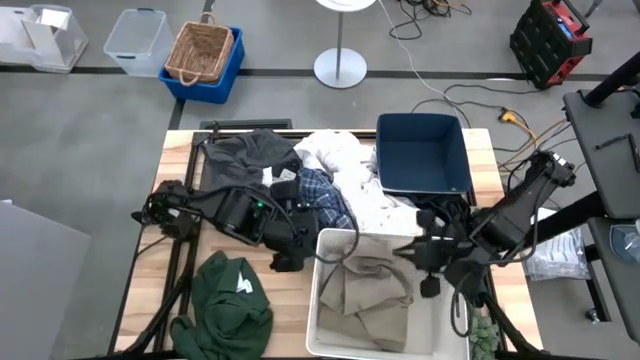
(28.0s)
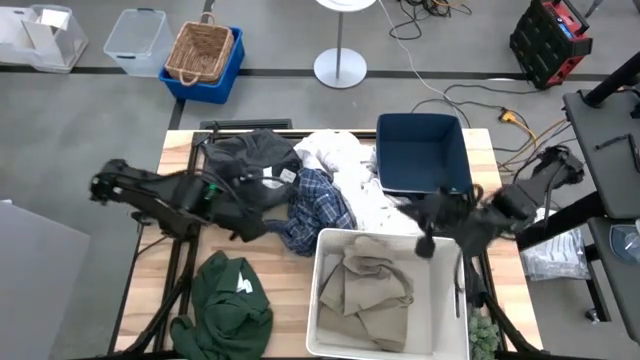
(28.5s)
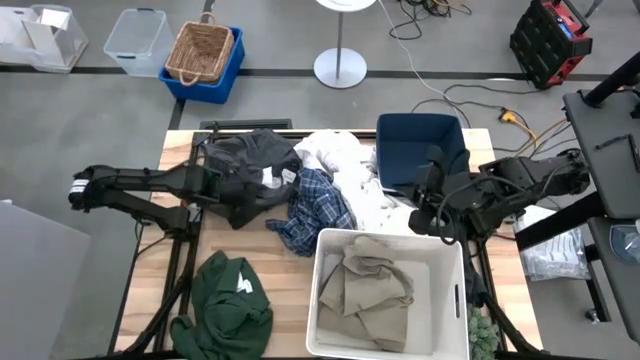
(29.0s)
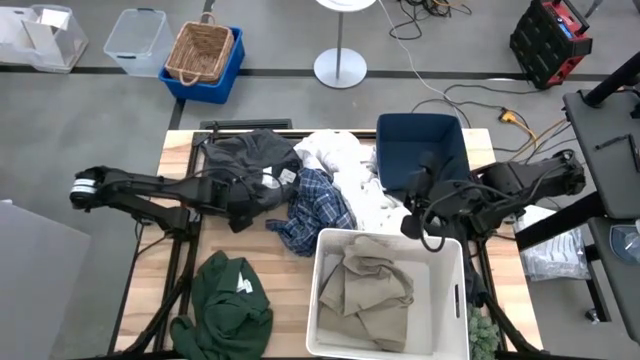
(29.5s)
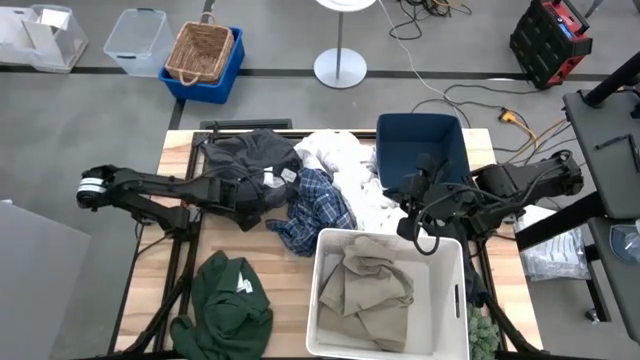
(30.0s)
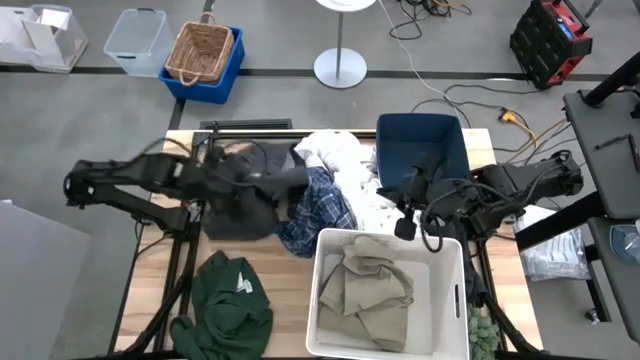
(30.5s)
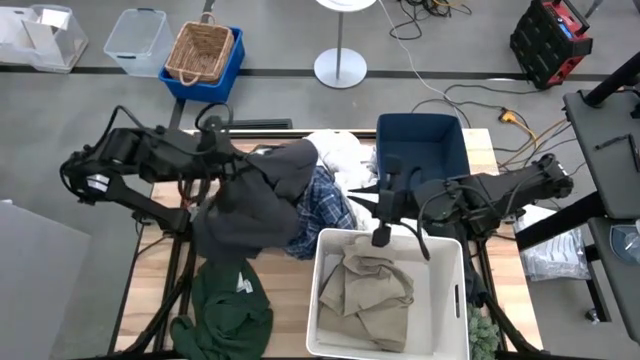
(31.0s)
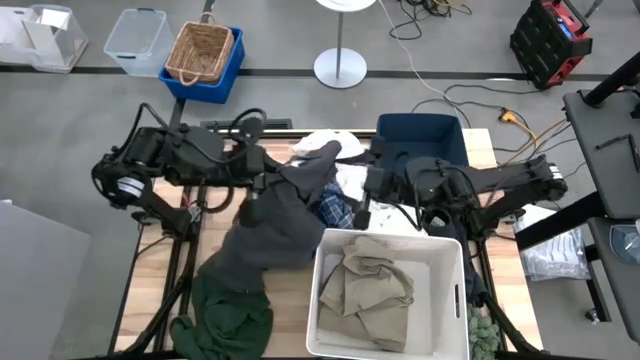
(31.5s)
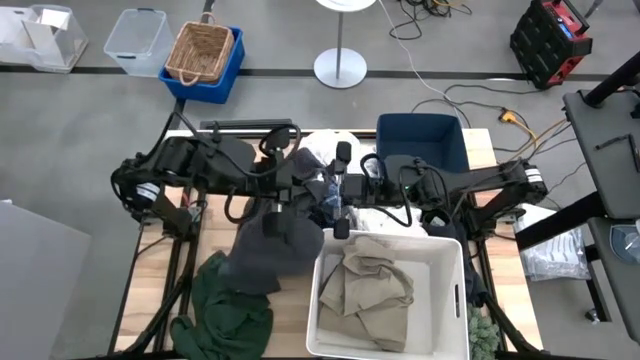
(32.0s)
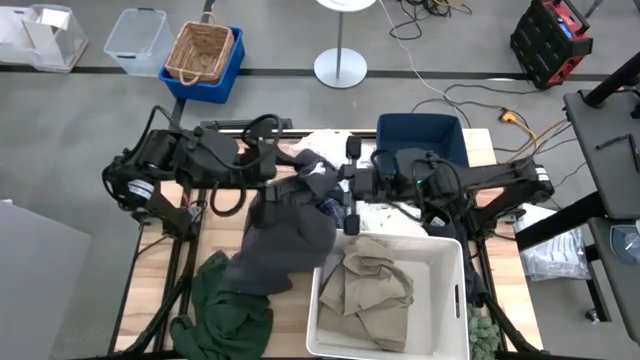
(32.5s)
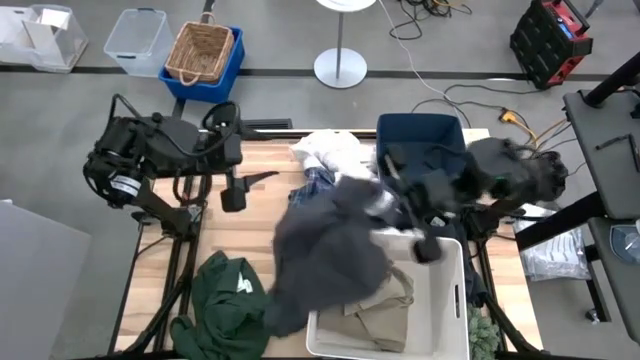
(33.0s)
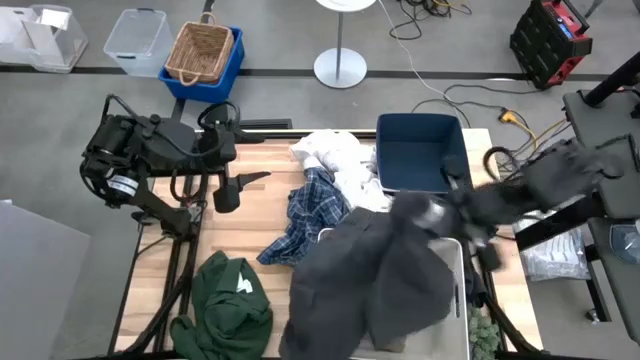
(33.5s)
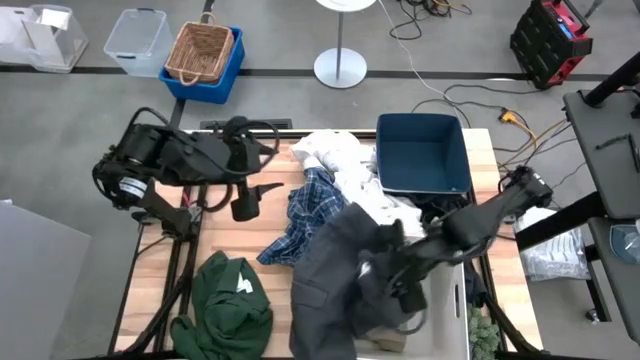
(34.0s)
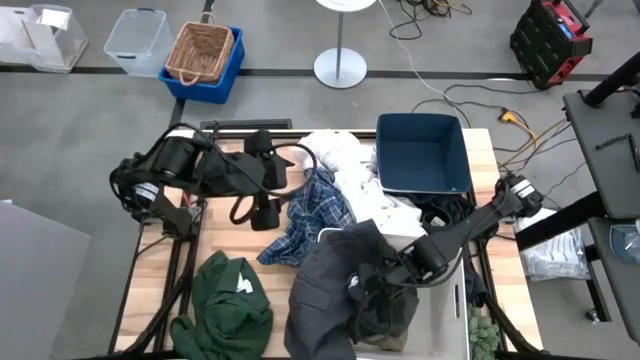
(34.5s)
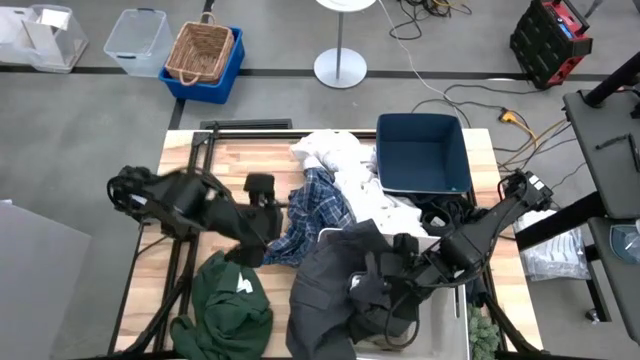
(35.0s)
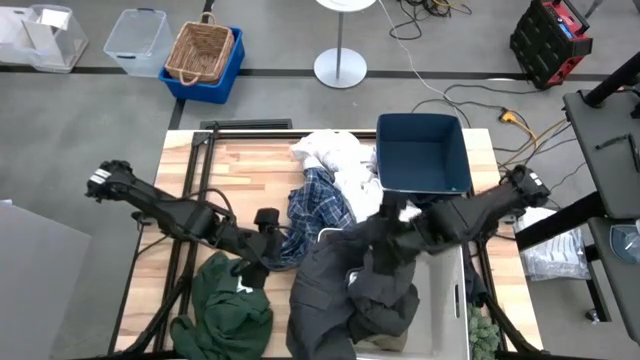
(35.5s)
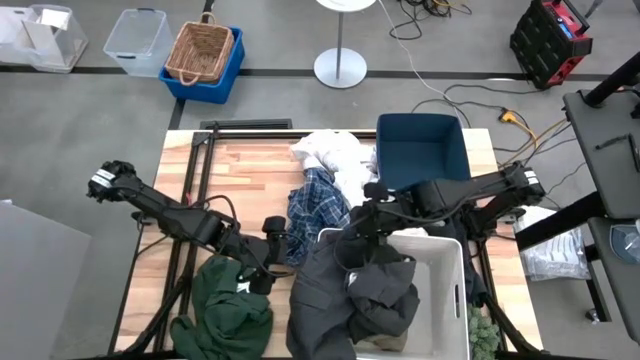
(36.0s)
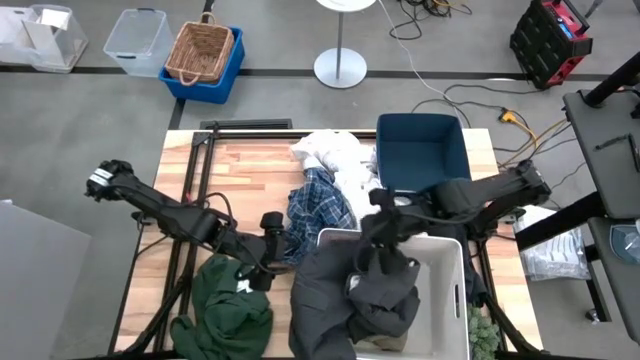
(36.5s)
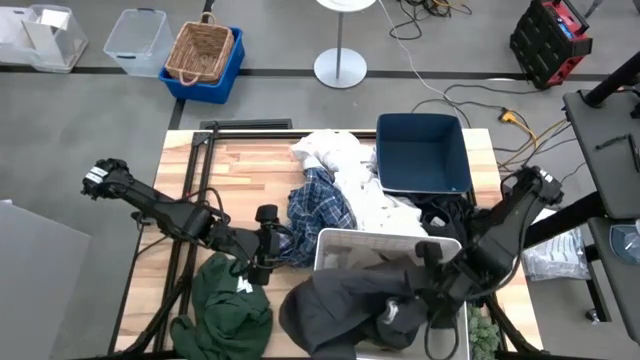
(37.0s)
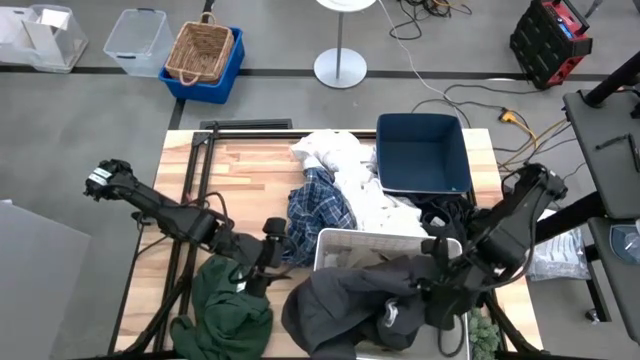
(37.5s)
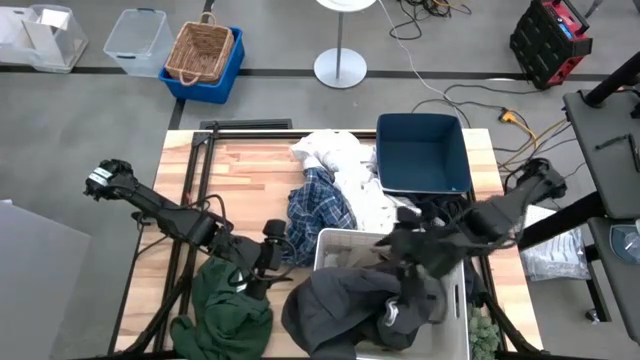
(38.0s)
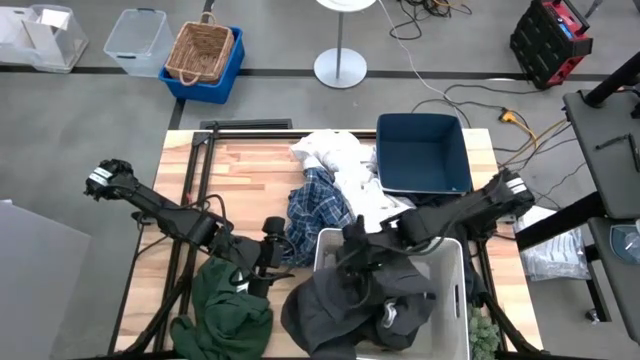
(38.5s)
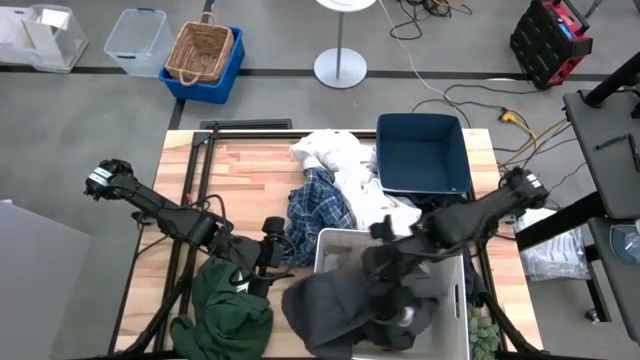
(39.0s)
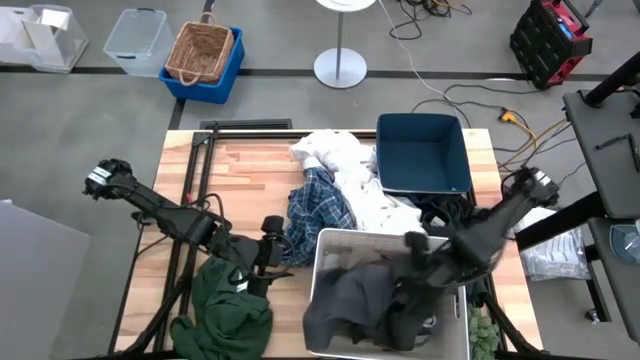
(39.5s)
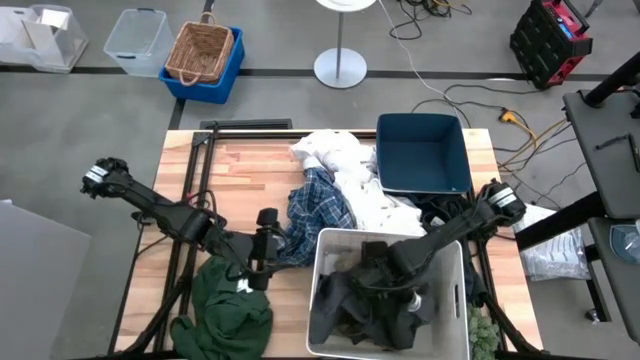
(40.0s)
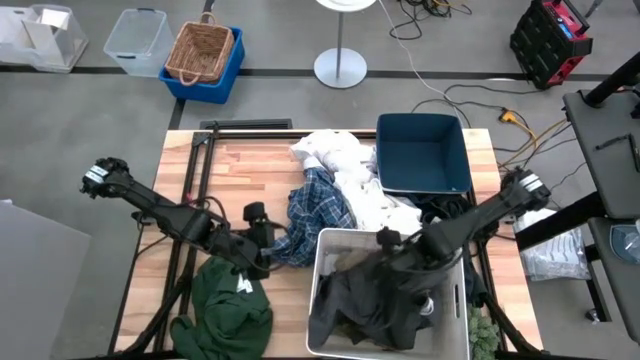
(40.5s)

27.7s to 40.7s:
Task: Sort clothes
Put the gray shorts into the white bin

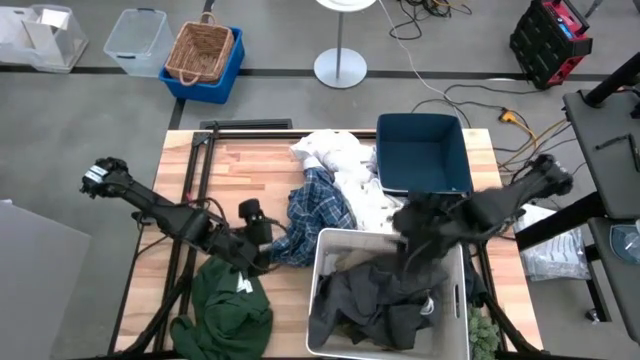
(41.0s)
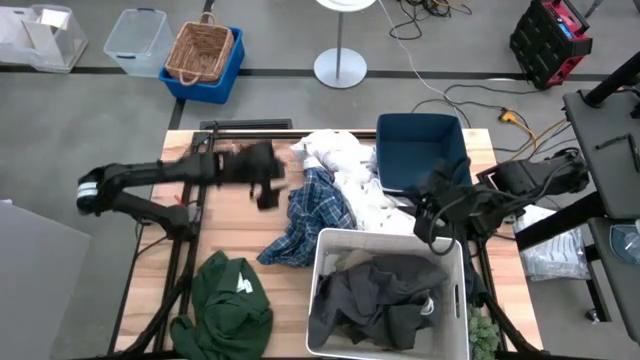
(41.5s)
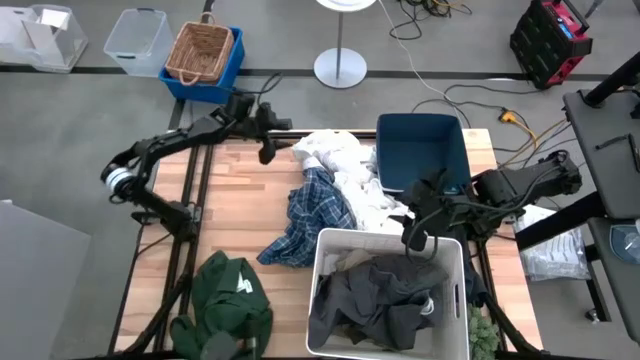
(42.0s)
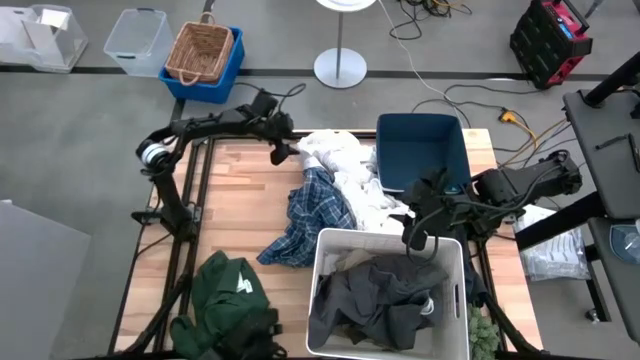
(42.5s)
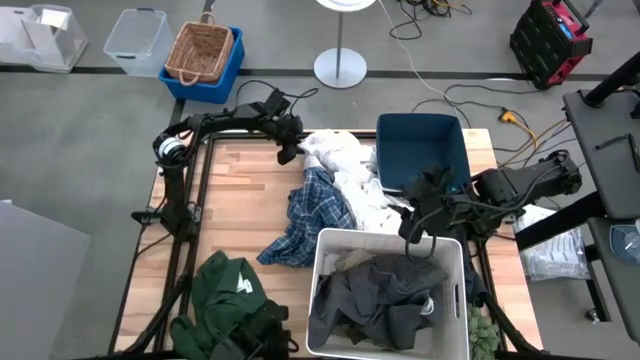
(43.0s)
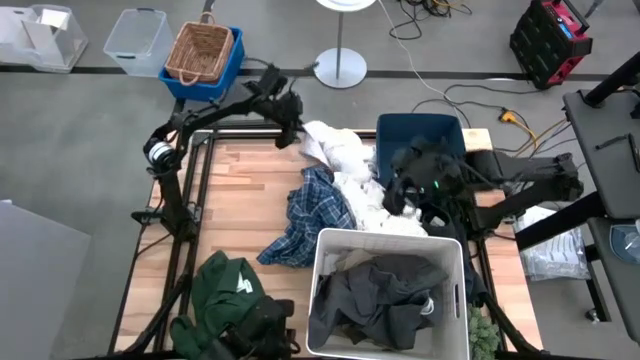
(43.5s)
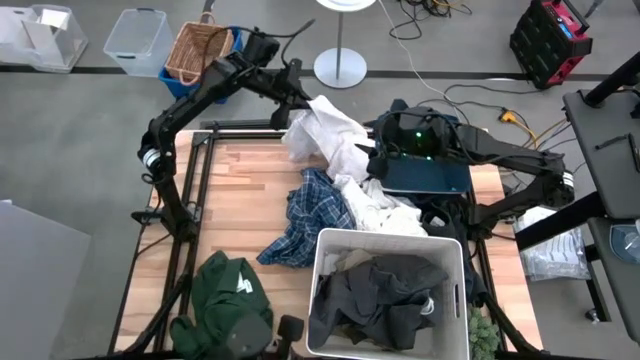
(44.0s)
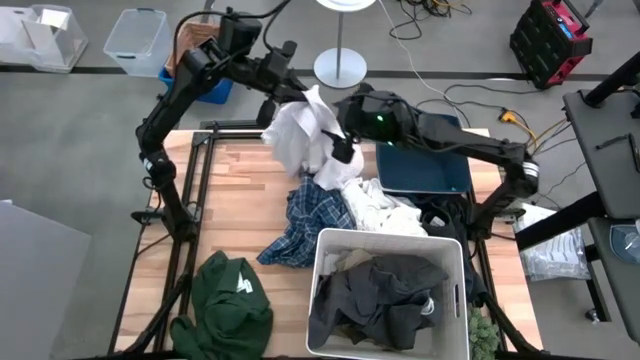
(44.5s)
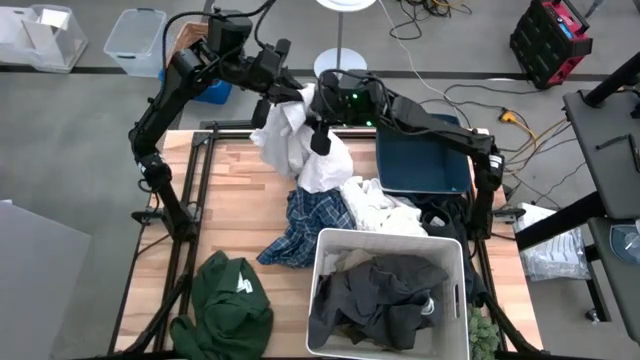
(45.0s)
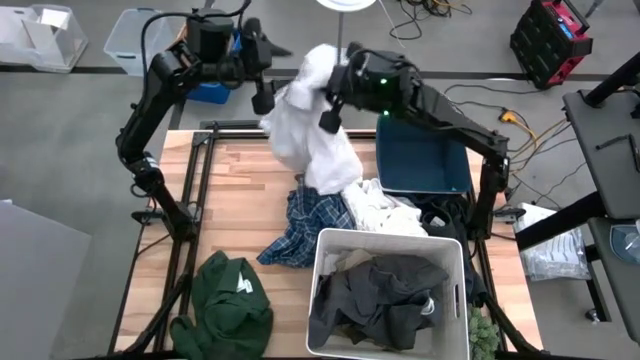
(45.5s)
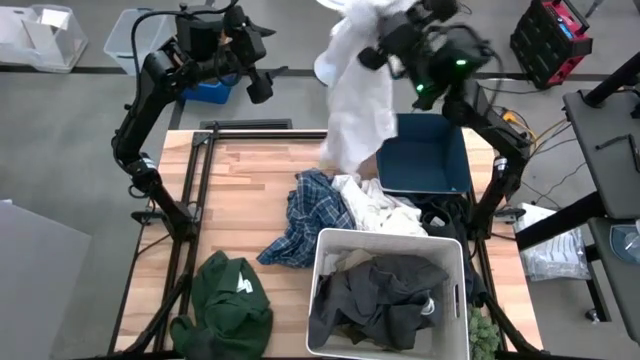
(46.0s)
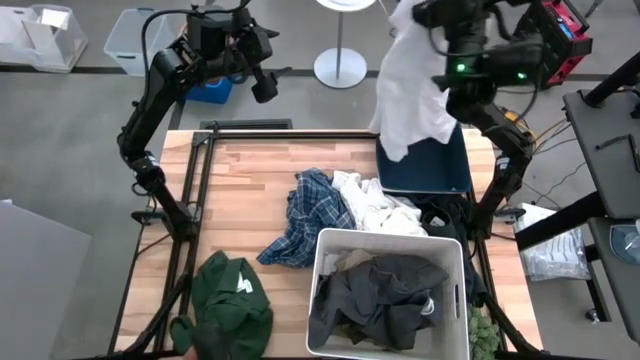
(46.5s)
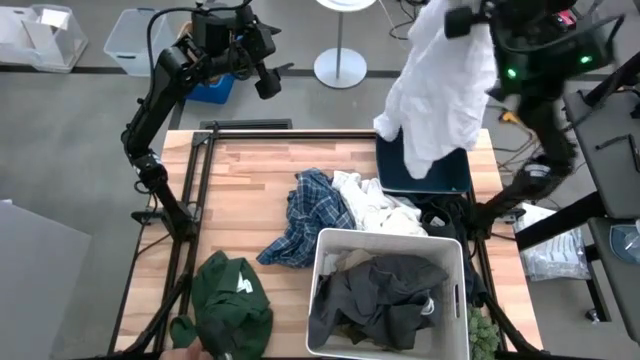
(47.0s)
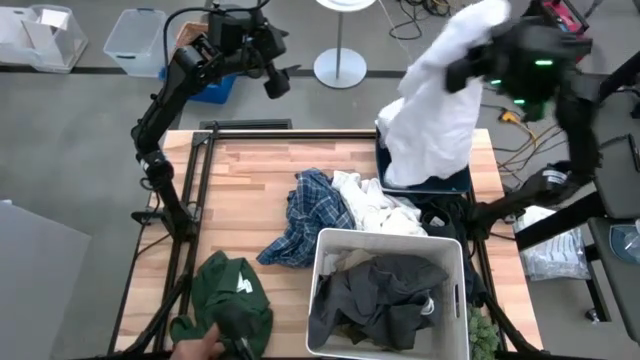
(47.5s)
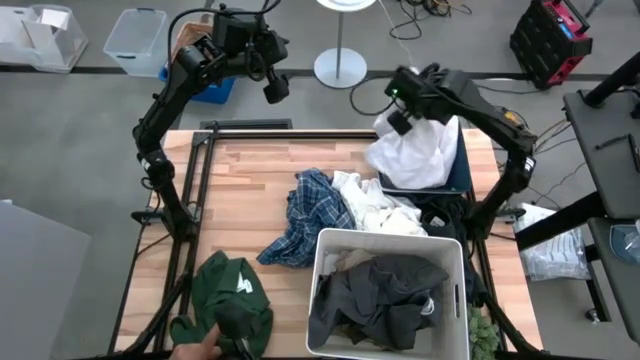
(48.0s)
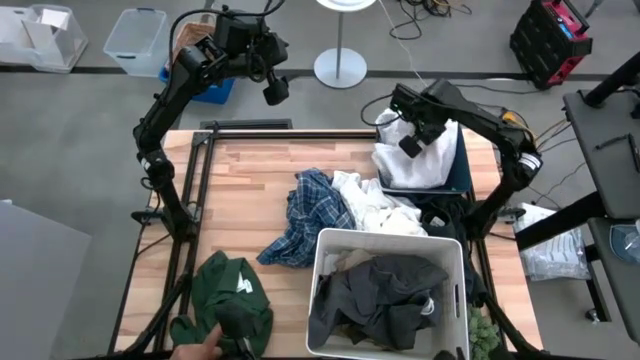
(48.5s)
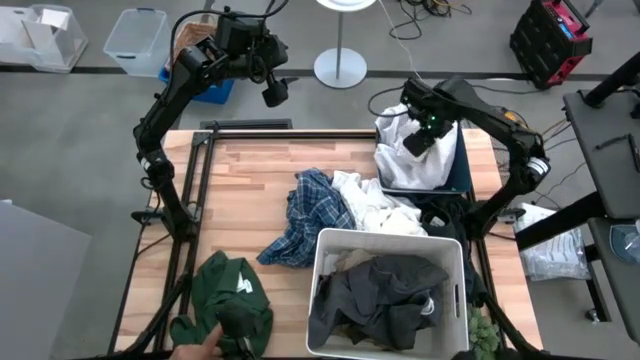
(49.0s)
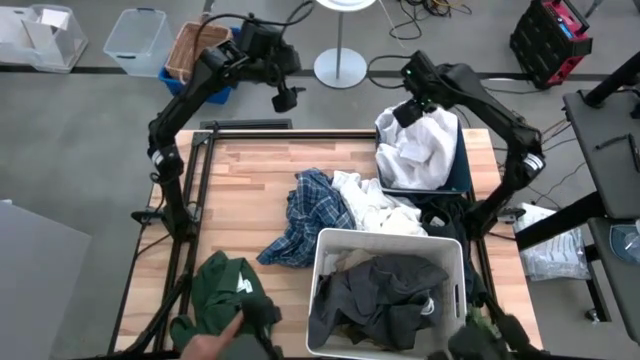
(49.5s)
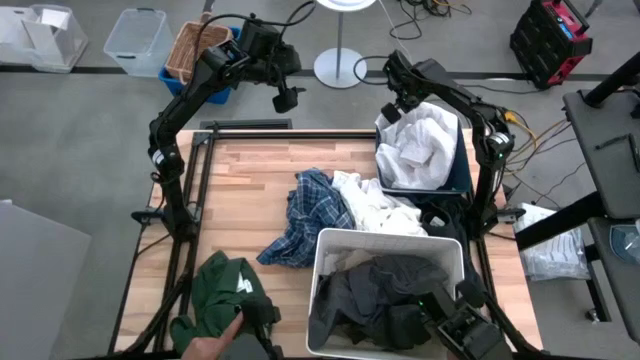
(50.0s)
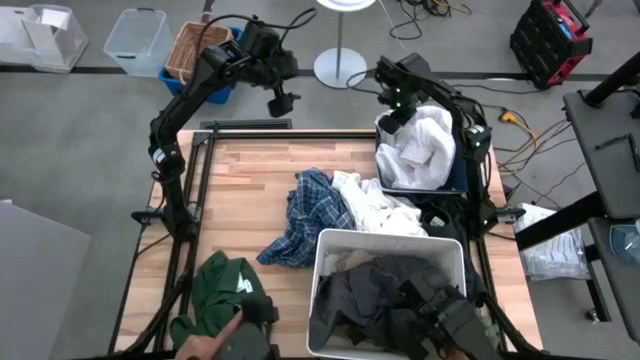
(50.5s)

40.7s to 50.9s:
Put the top white shirt into the blue bin
